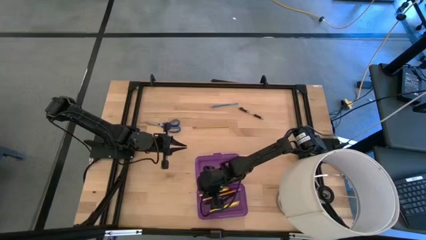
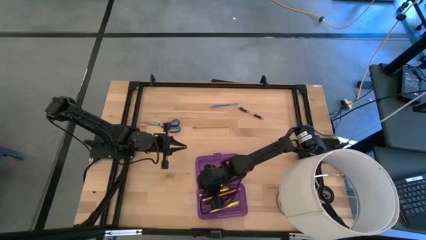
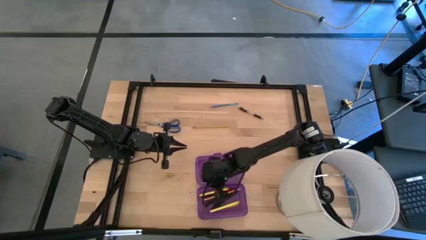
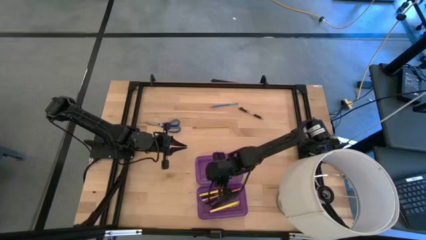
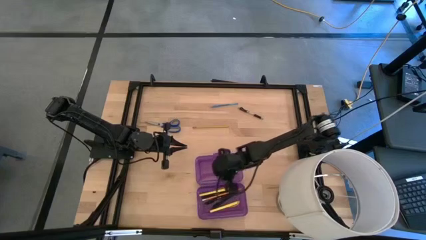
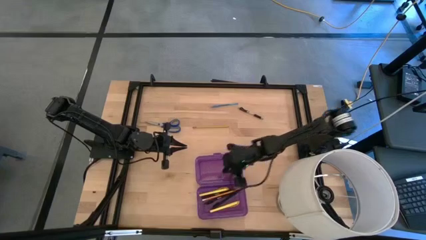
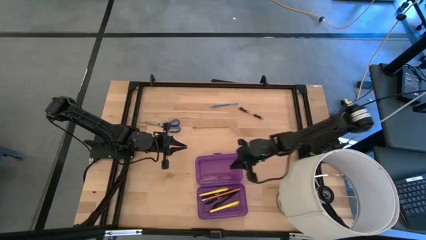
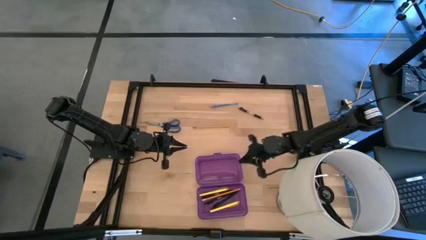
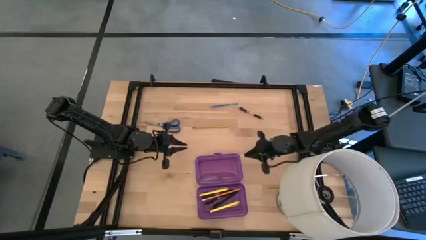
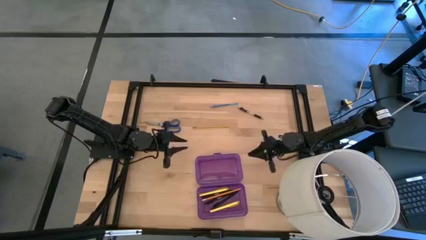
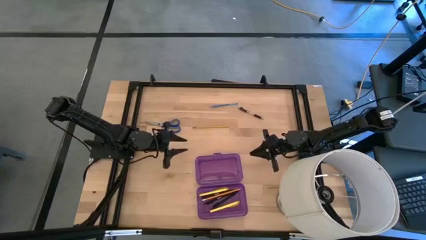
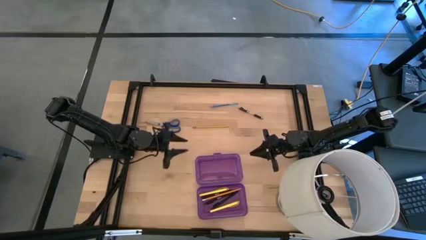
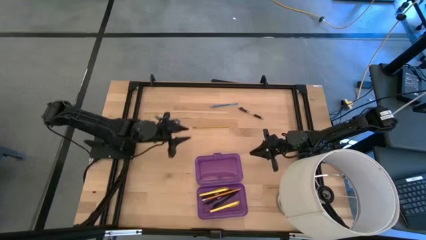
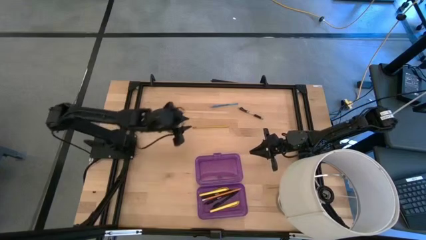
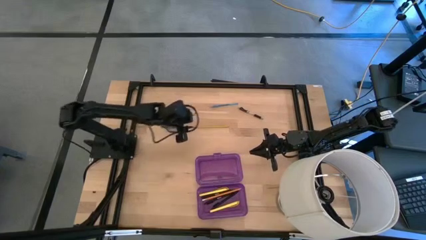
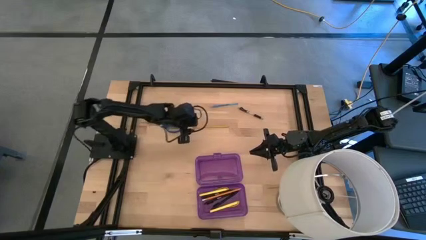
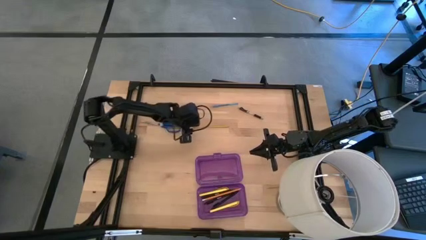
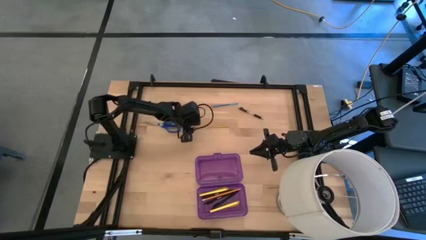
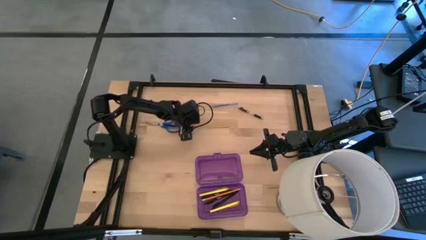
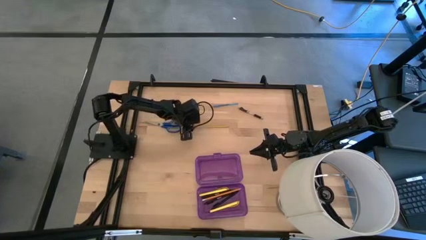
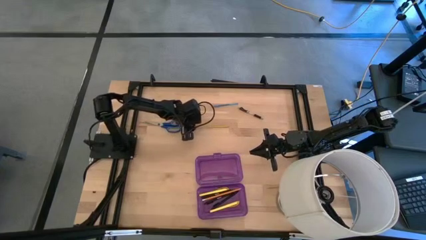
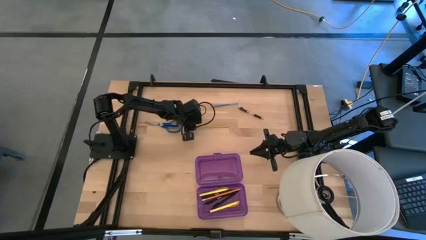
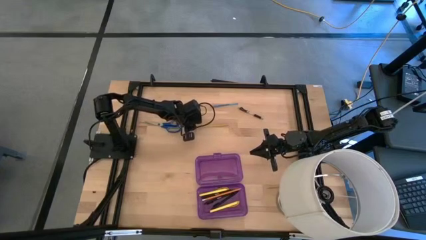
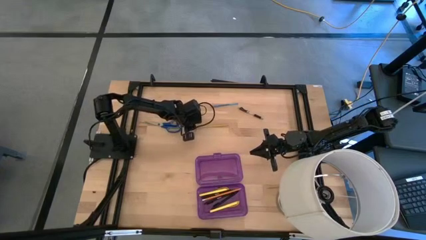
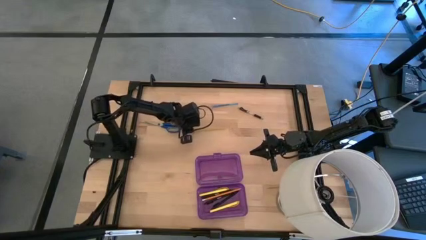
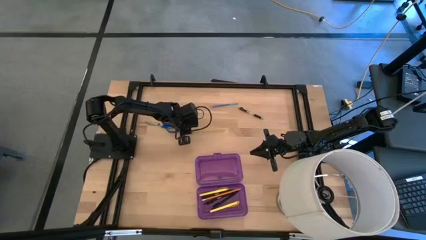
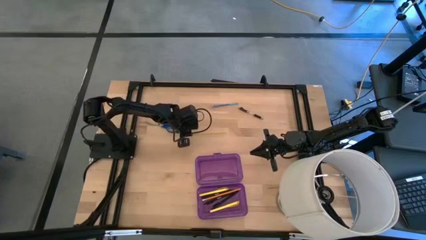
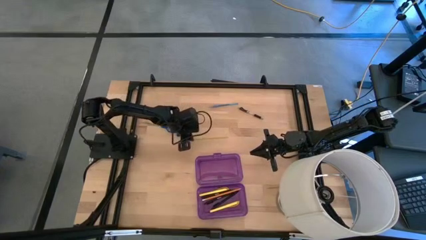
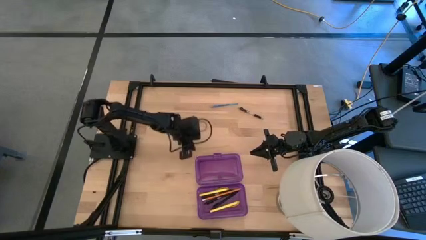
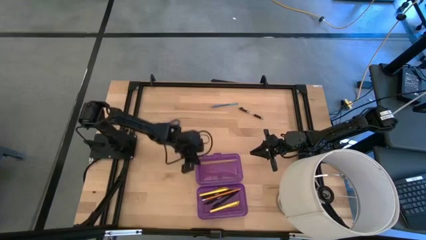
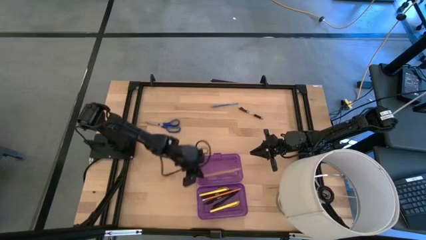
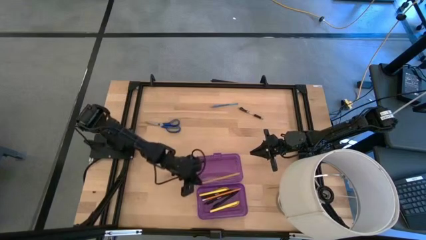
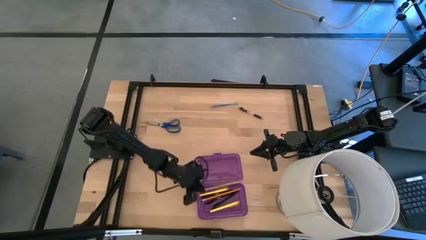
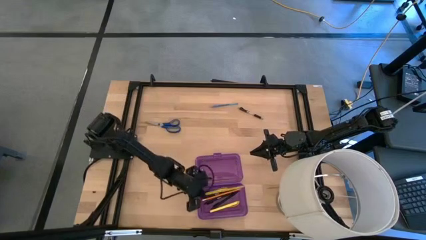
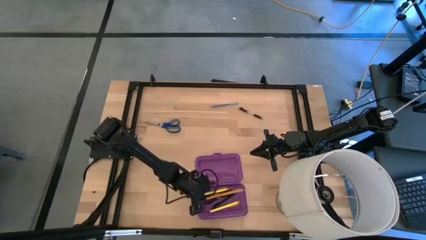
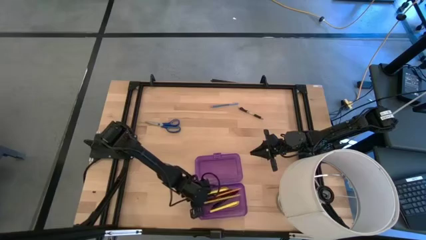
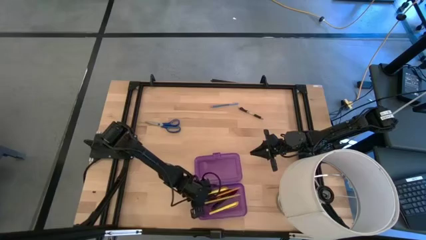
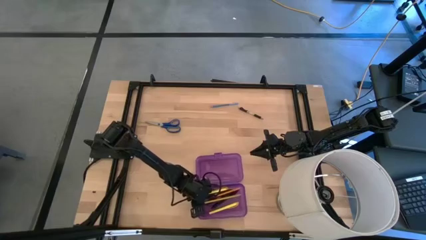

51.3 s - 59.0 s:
Task: Pick & place school supplies into a supply box
Put the yellow pencil into the violet supply box

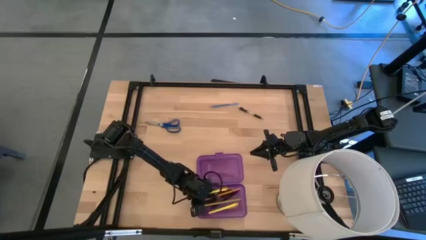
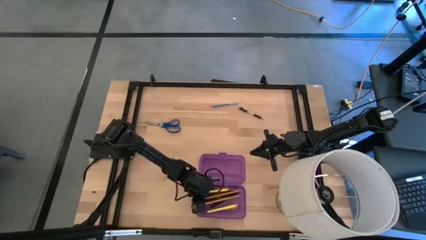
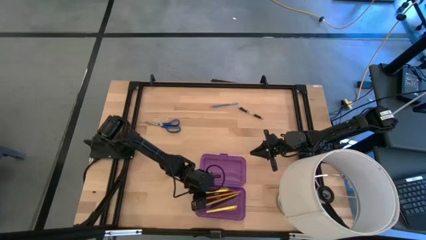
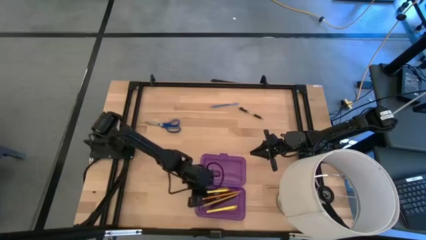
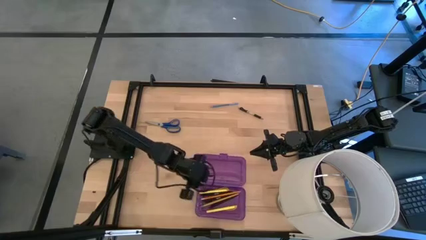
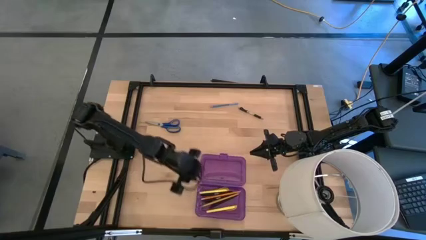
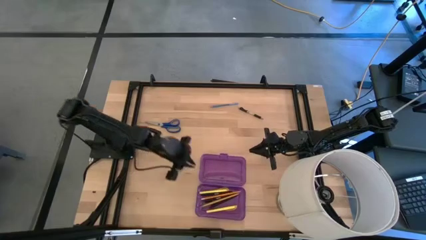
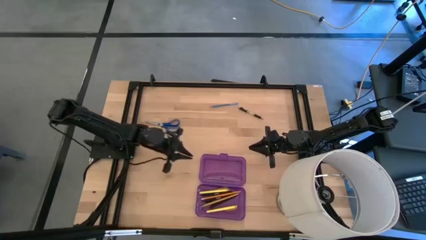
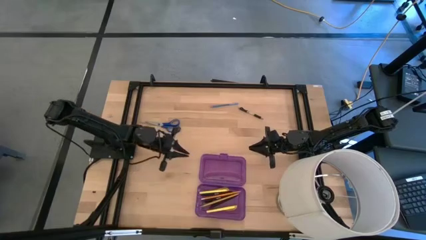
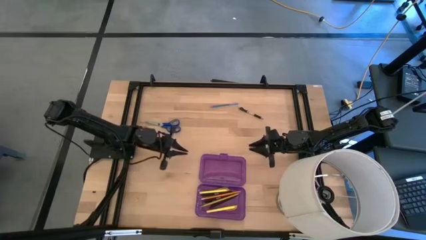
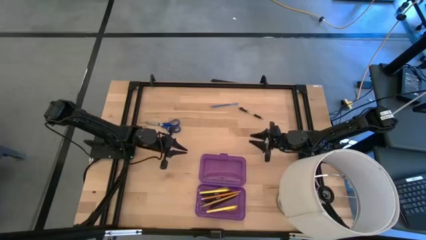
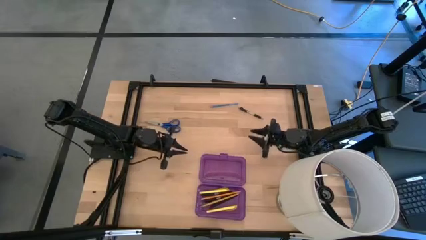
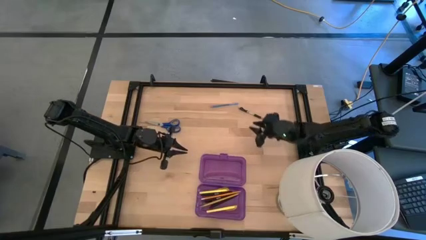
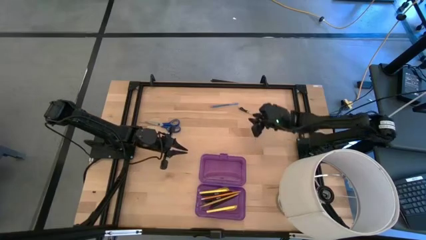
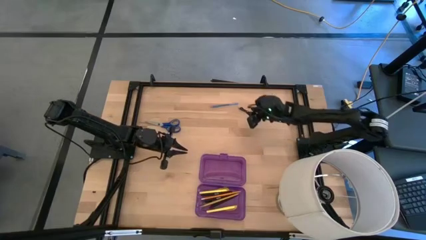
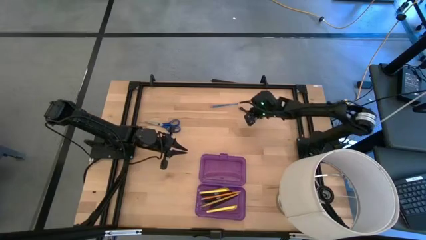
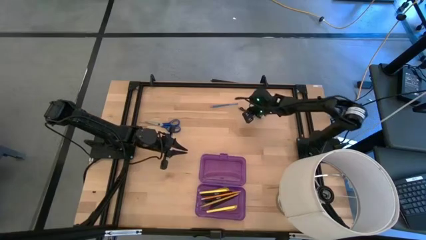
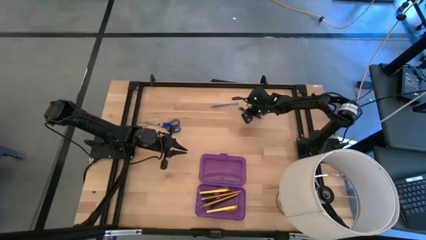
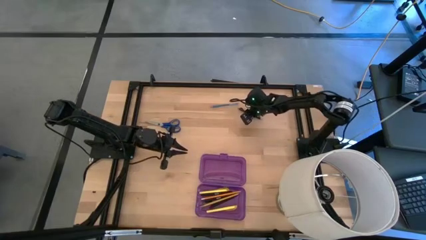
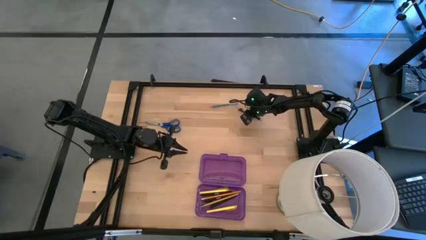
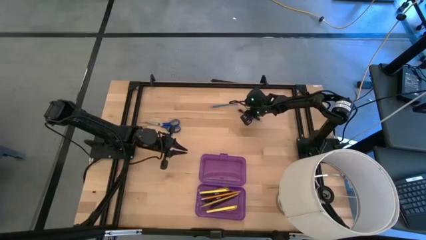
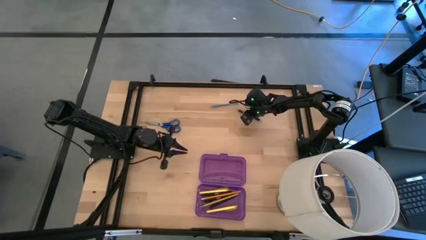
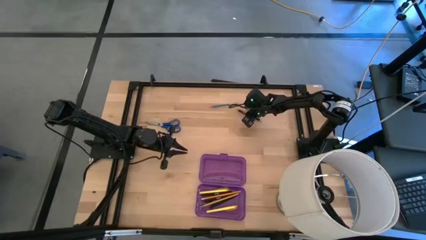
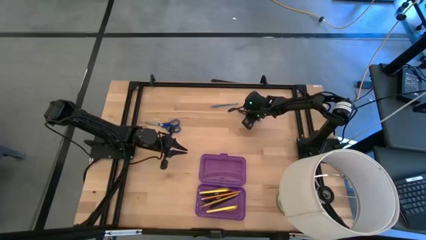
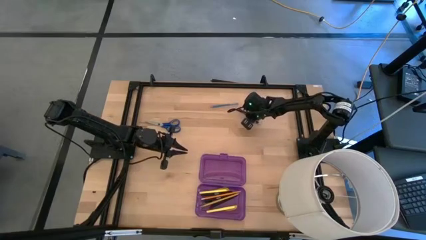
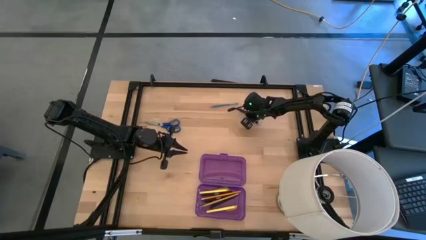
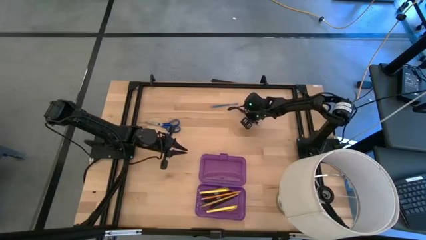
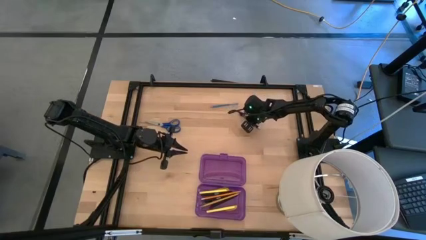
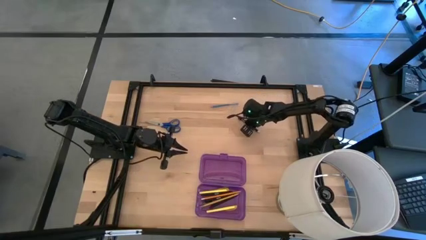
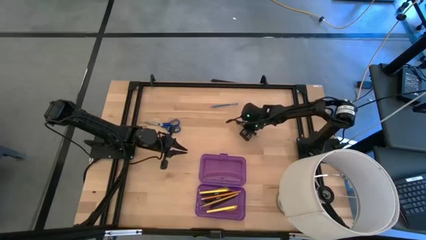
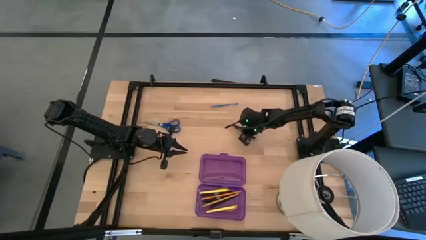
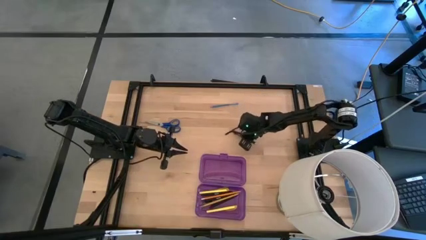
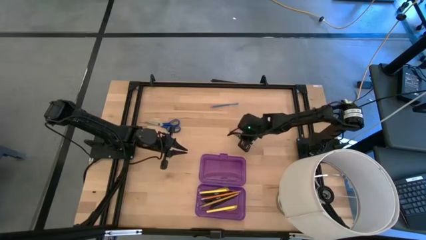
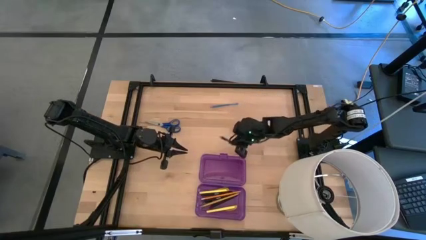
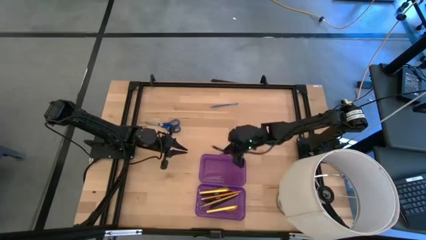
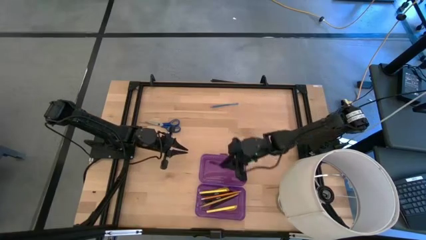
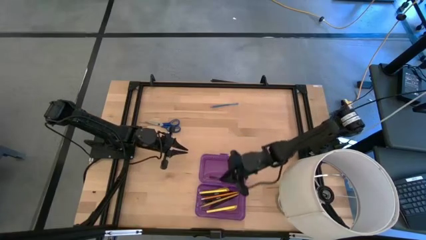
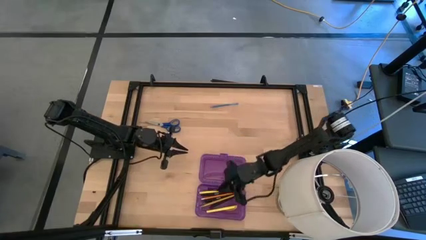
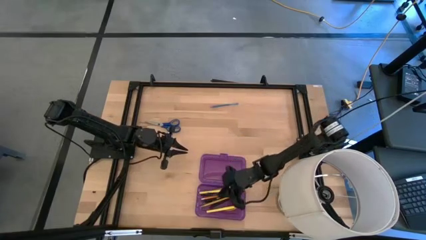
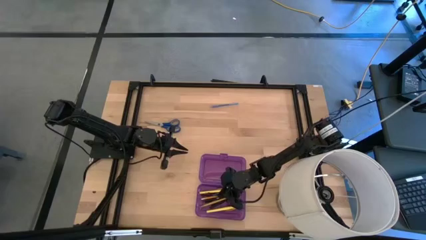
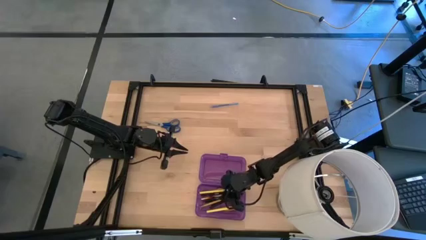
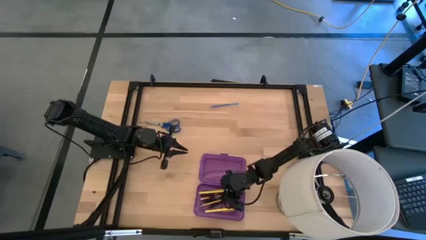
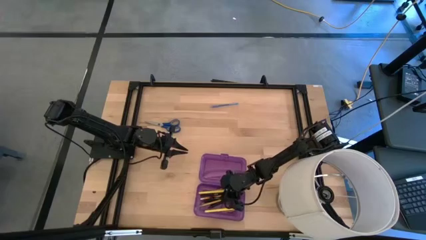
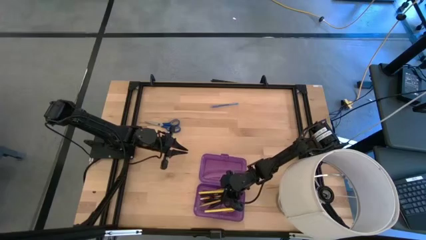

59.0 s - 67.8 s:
Put the transparent pen into the violet supply box

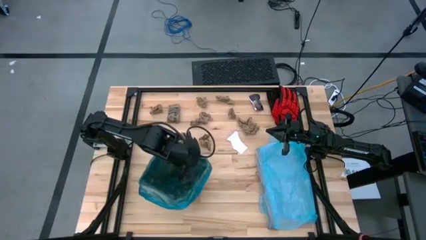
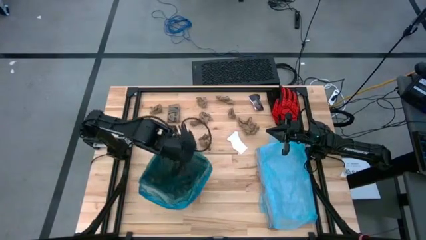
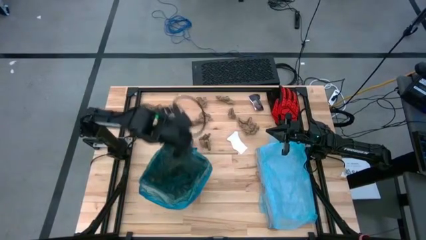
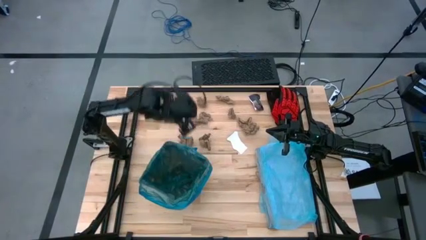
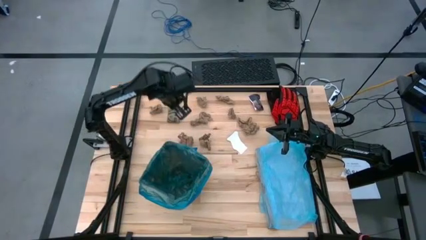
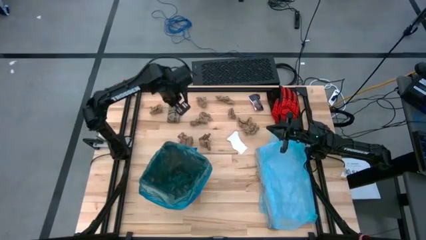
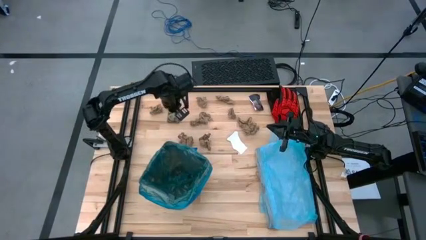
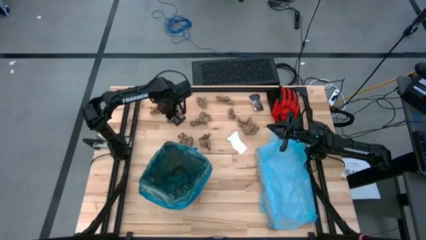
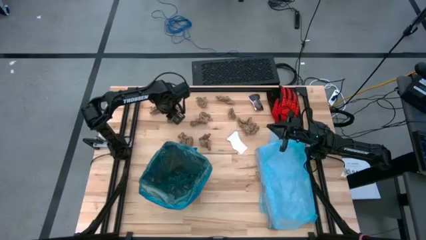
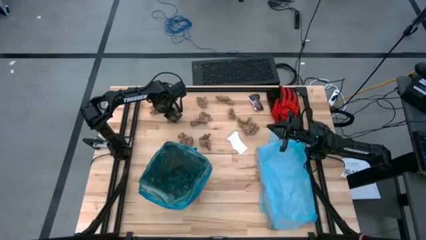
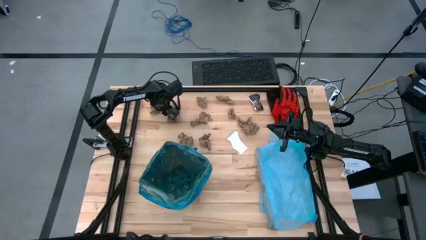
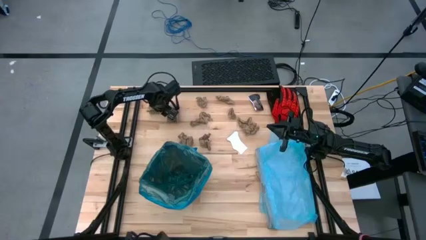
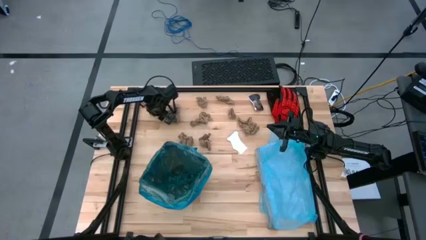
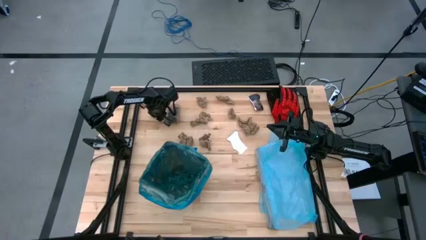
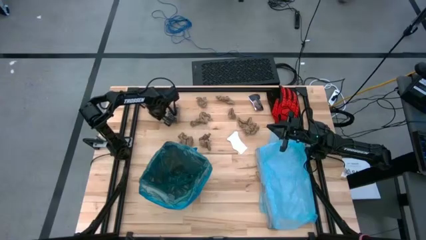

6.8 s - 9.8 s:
Task: place trash/remove bag and relplace
Put the brown napkin into the trash bin
